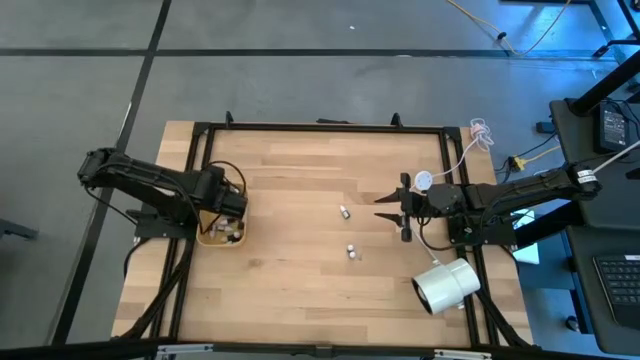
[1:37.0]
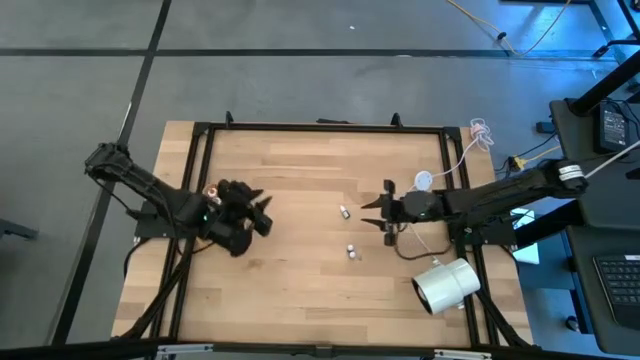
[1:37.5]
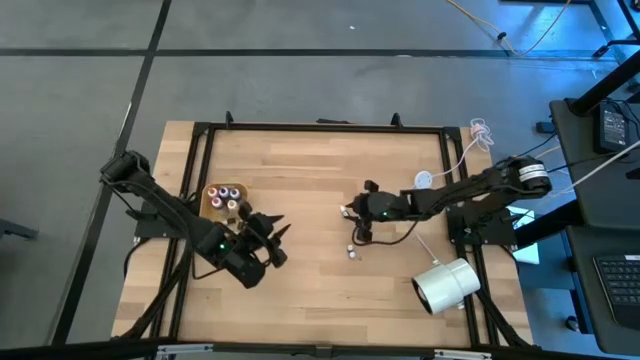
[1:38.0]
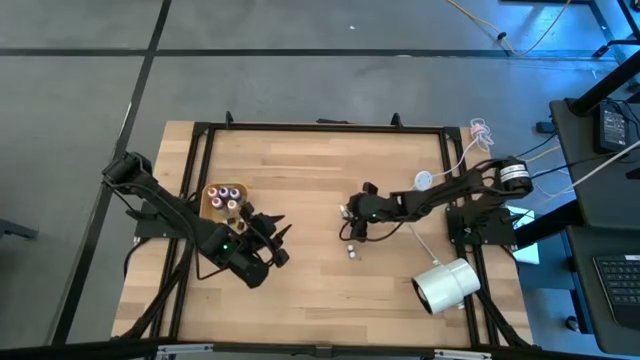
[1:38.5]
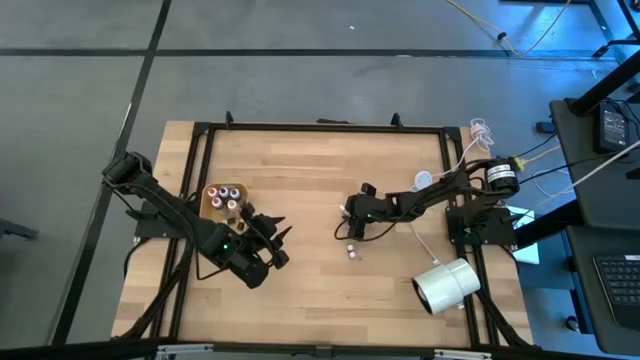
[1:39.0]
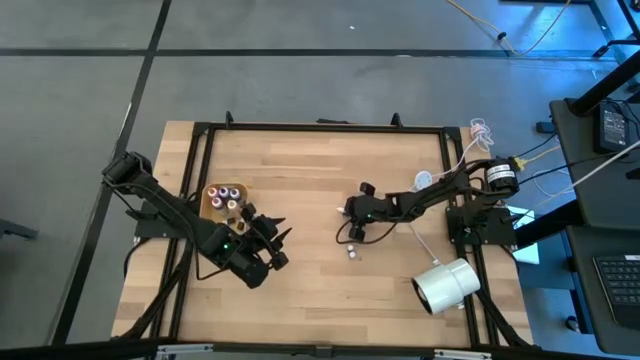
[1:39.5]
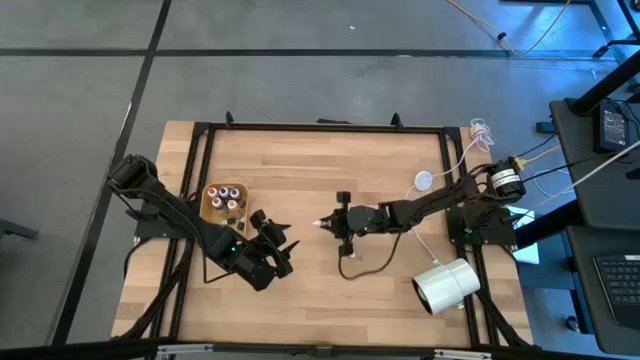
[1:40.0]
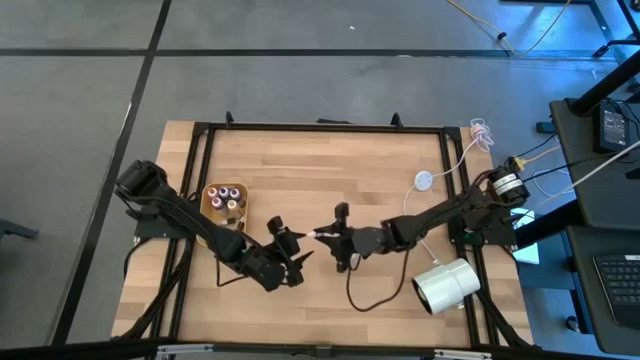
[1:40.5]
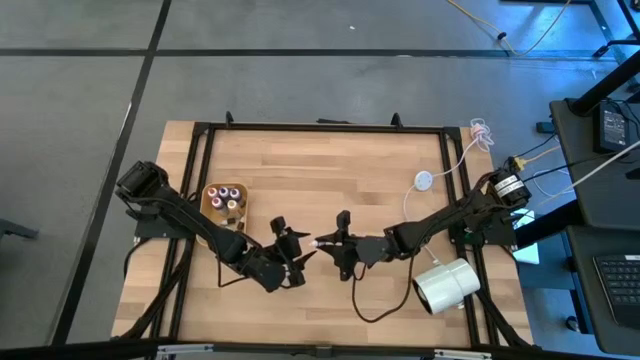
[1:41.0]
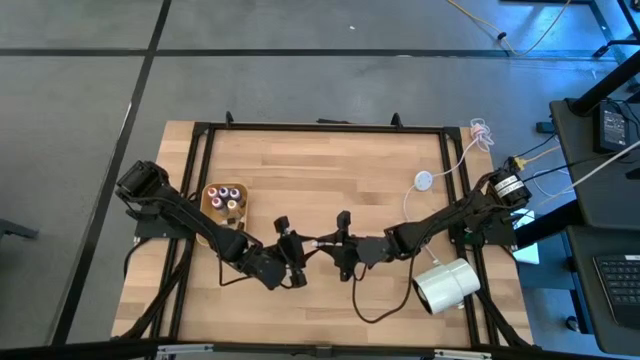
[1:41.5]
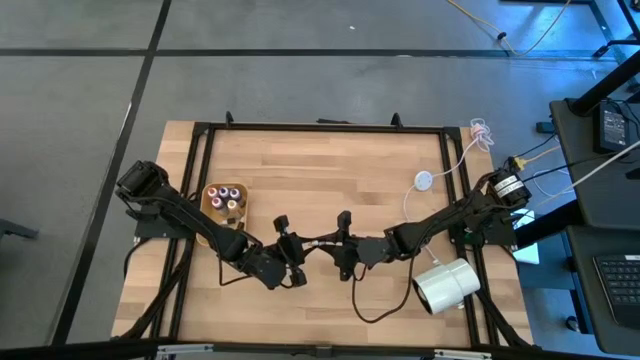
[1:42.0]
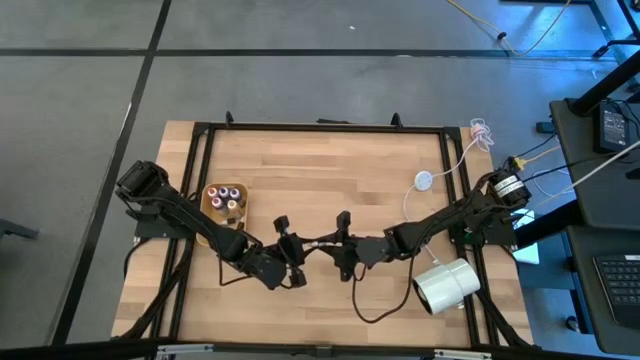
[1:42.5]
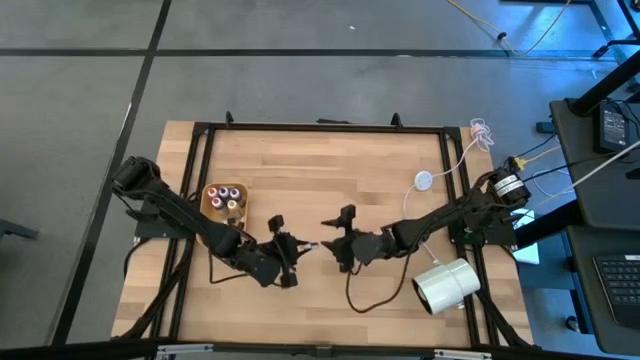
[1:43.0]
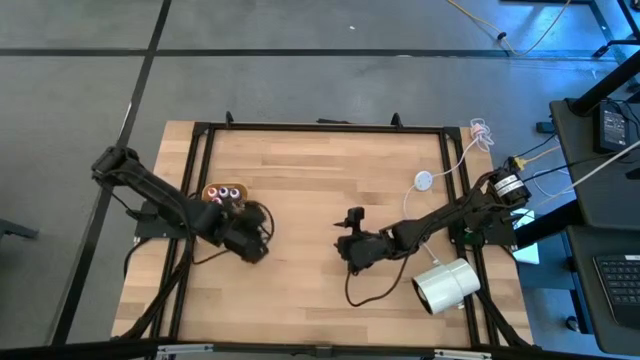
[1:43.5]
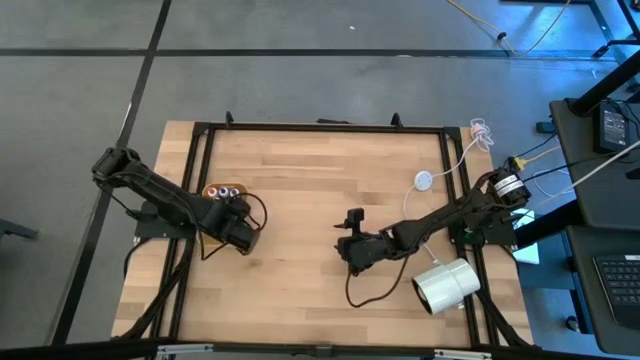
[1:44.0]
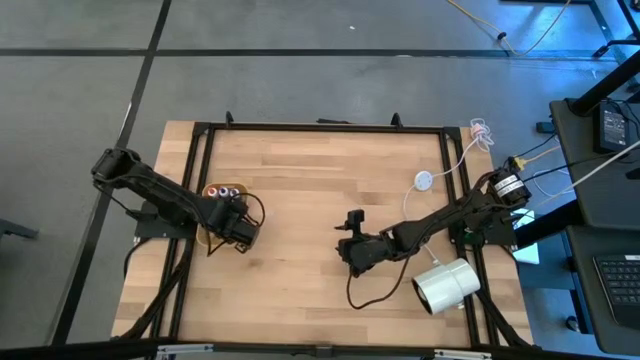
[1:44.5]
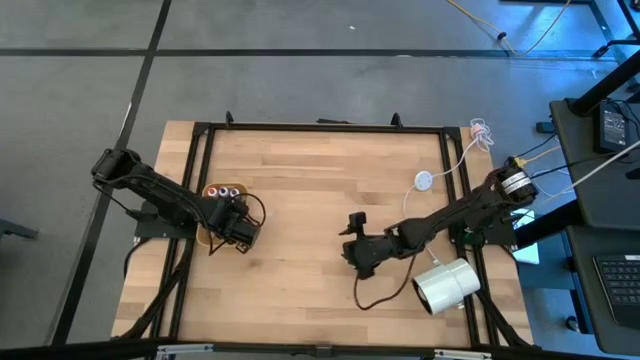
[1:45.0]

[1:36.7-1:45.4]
Task: Pick & Place food coloring
Put the small purple food coloring bottle into the yellow bin

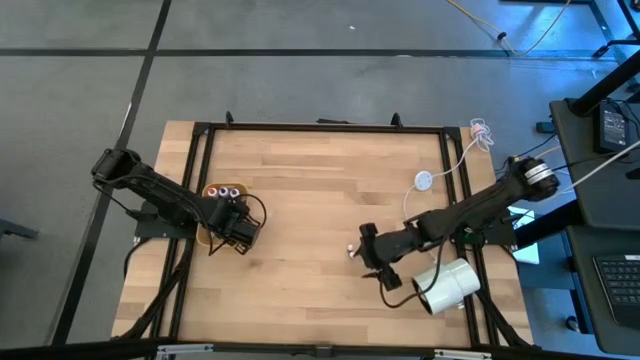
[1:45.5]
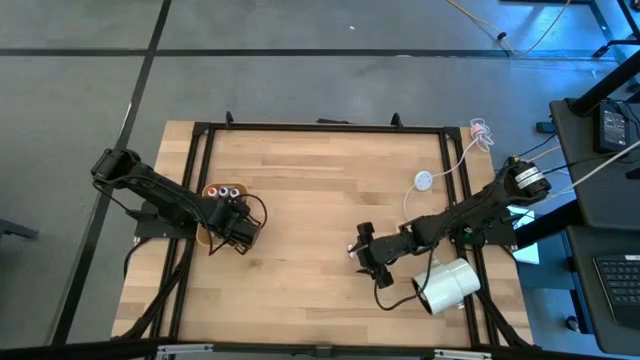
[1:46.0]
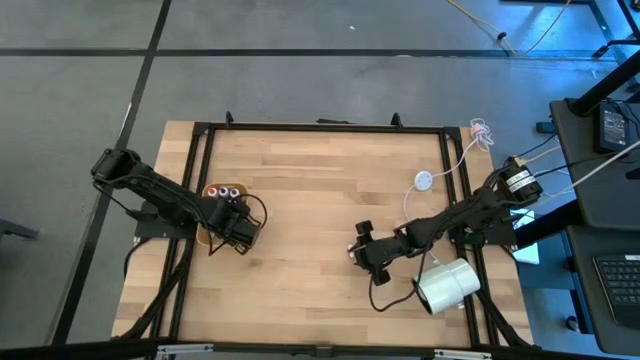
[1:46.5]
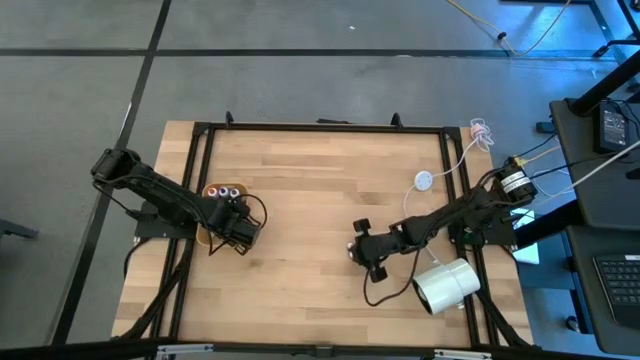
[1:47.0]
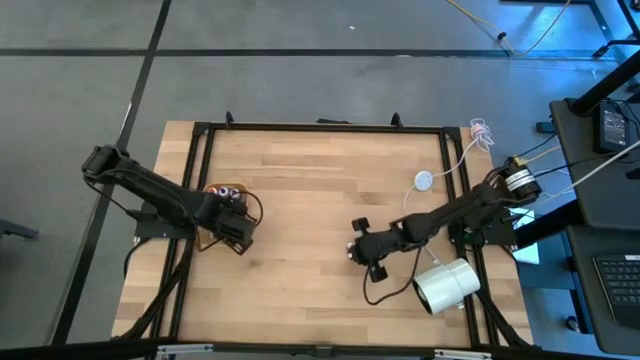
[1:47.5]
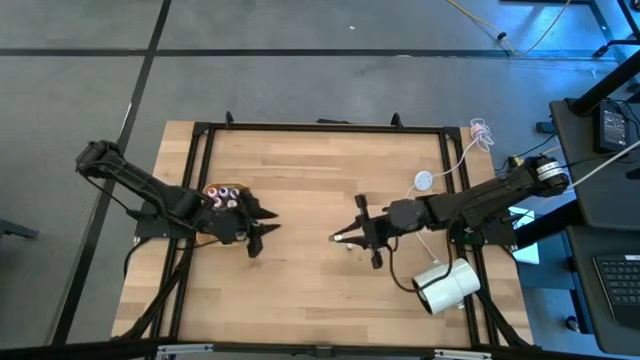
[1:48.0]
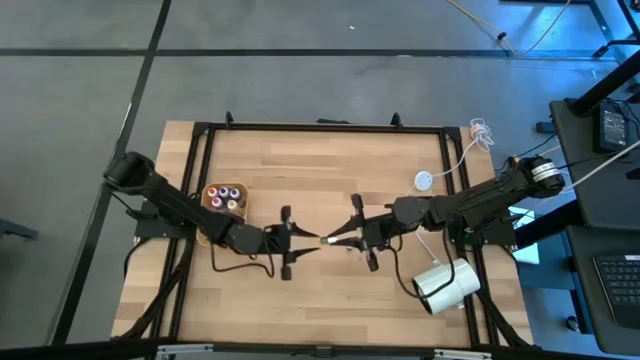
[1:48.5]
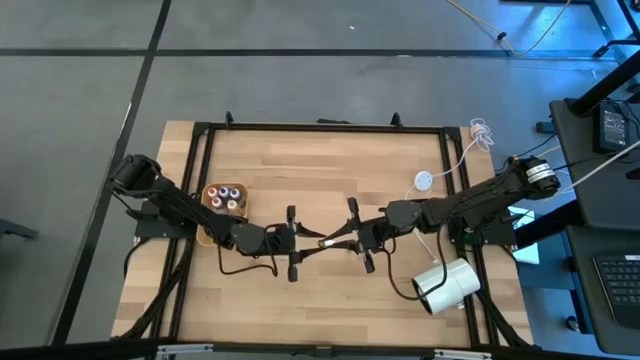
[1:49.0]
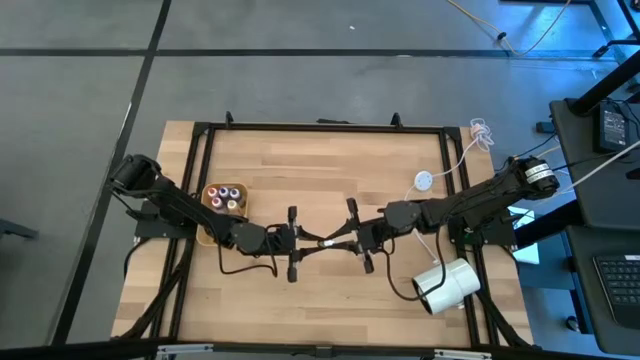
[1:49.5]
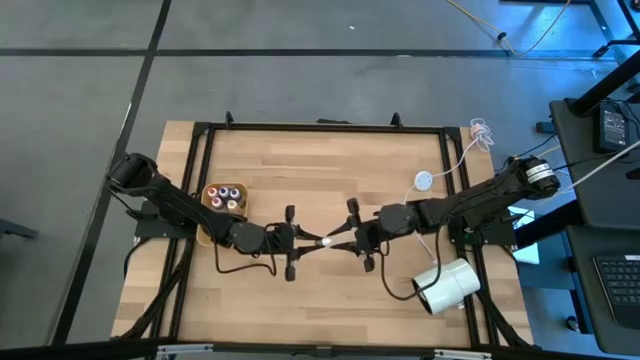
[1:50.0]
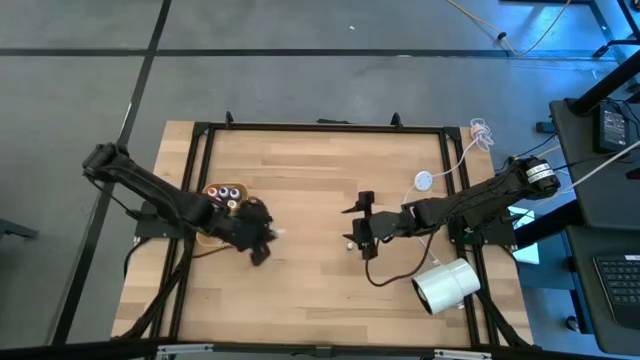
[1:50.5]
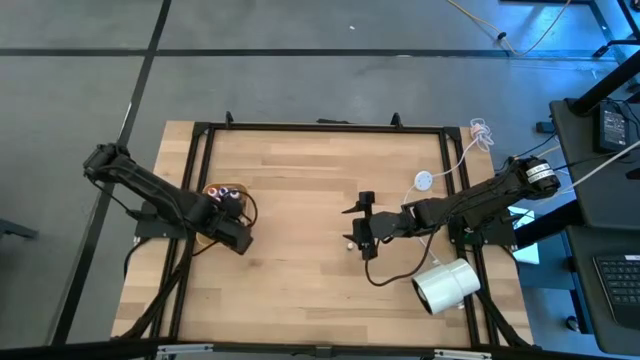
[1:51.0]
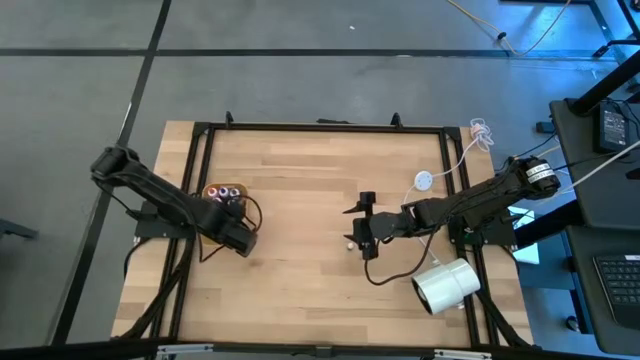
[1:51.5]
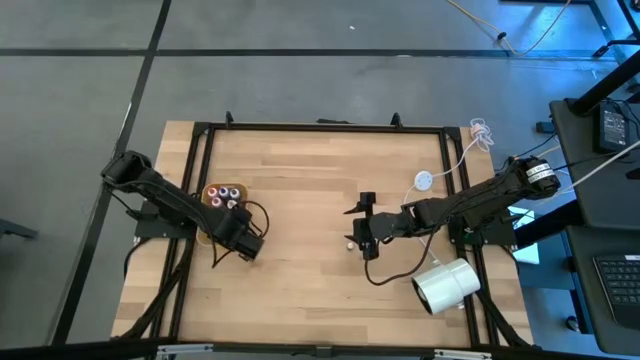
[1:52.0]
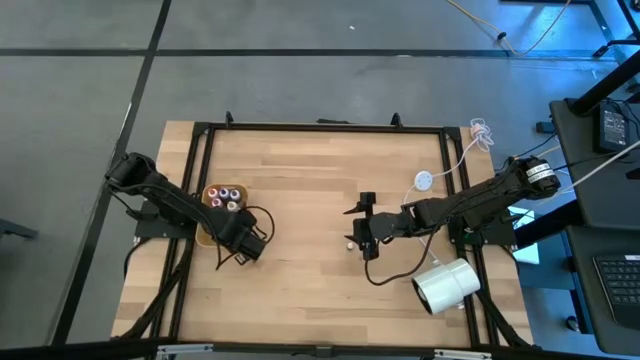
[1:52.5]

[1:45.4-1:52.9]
Put the small green food coloring bottle into the yellow bin

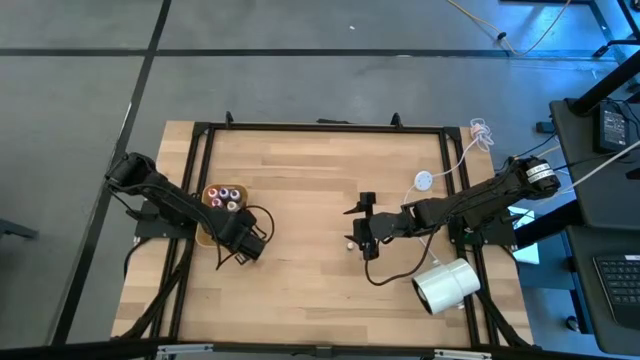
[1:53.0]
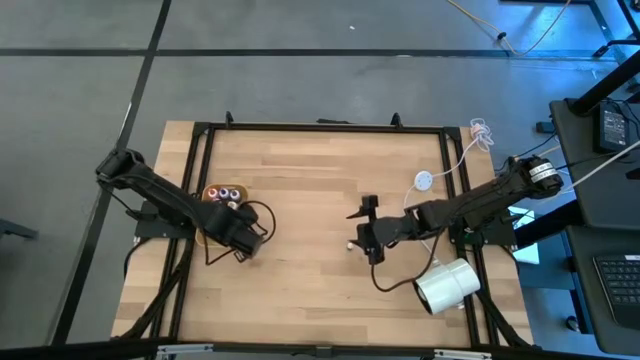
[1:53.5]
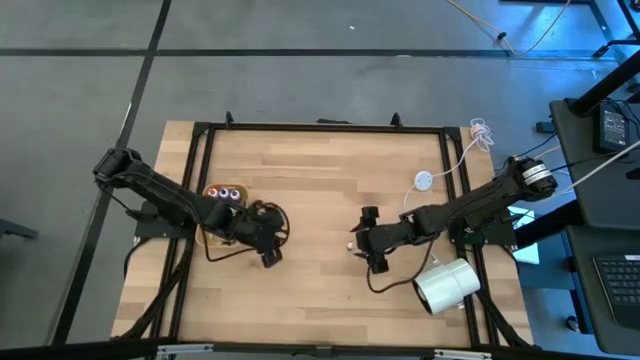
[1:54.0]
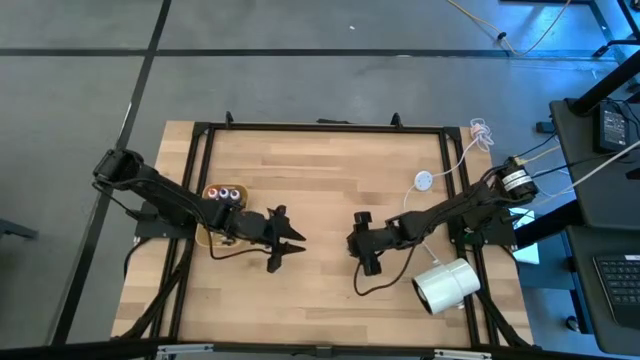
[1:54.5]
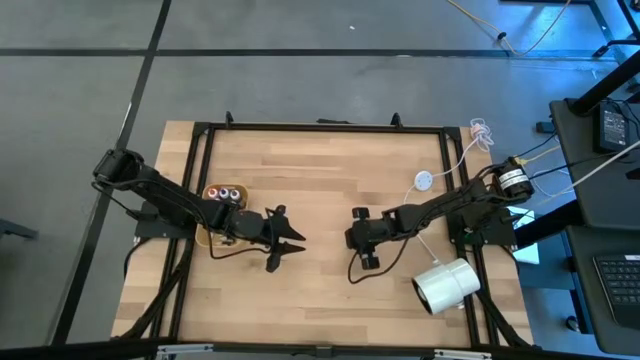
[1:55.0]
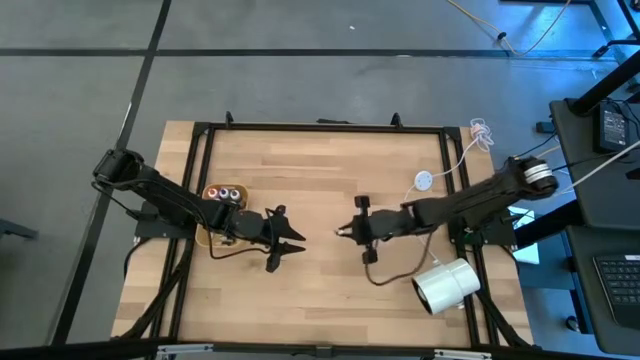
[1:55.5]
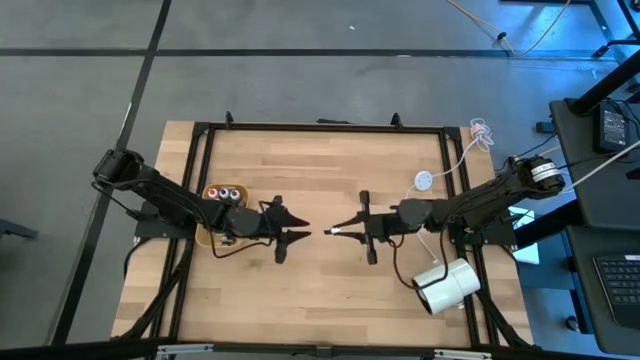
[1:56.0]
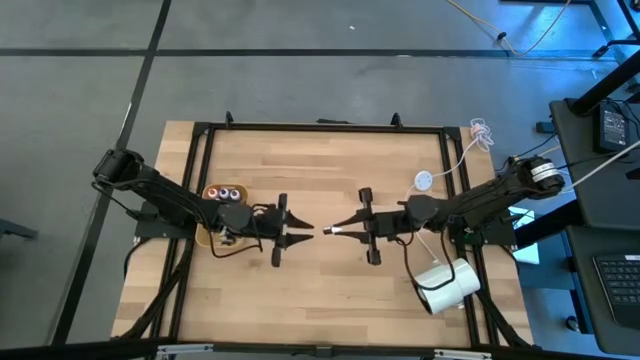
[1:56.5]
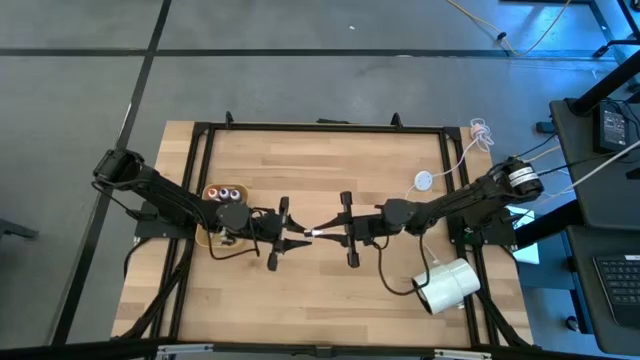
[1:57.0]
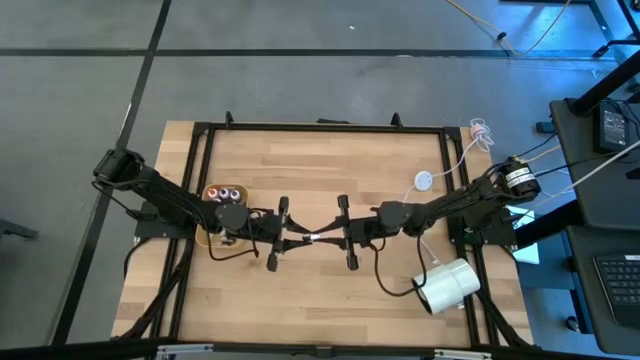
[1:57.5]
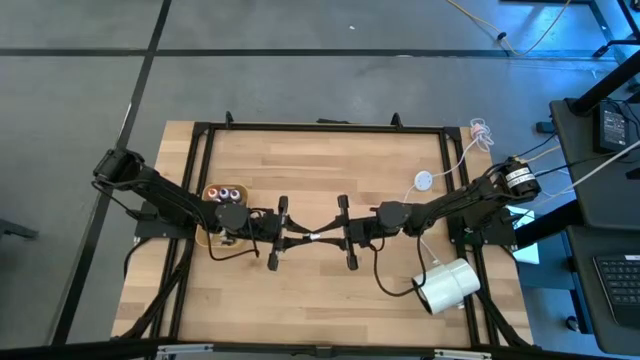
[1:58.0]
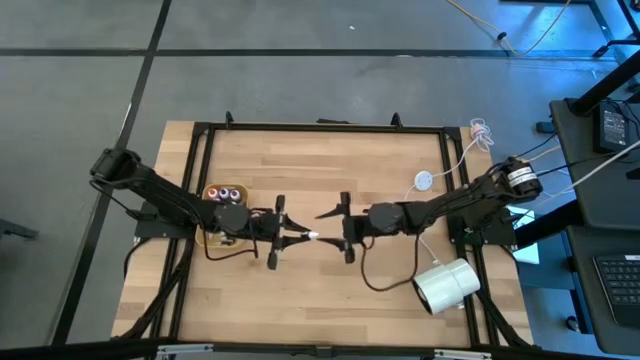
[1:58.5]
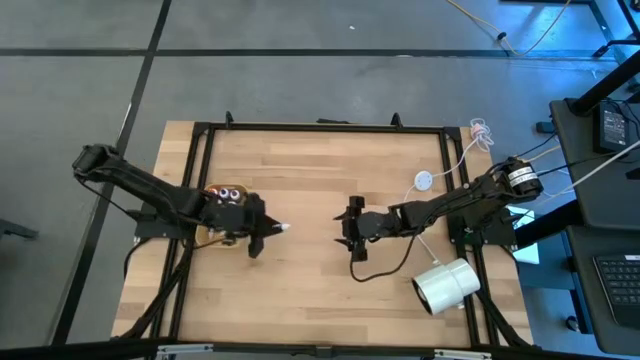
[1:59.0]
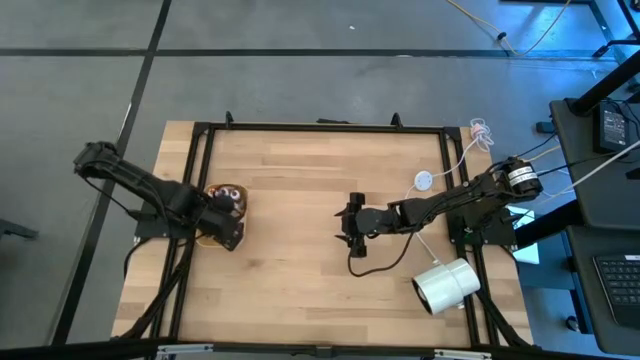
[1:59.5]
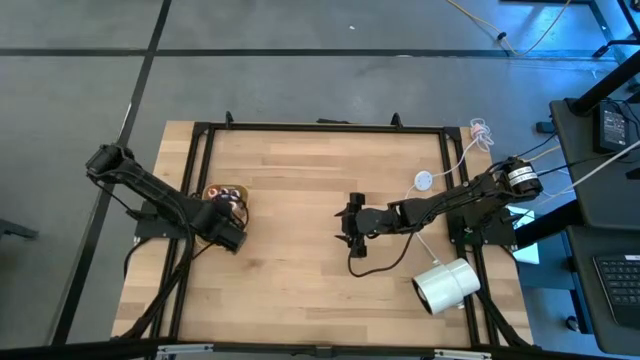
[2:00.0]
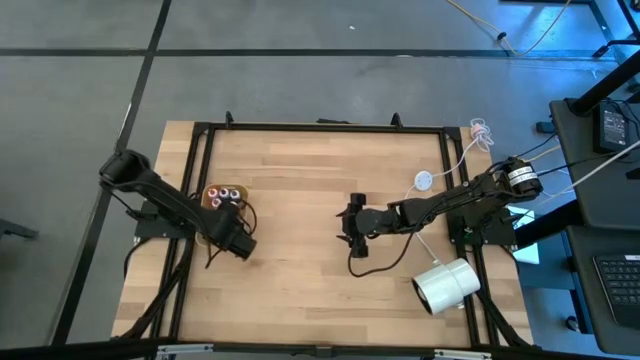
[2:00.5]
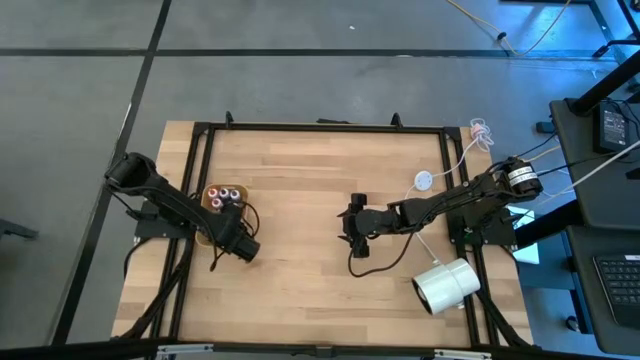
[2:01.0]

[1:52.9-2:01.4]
Put the small red food coloring bottle into the yellow bin
